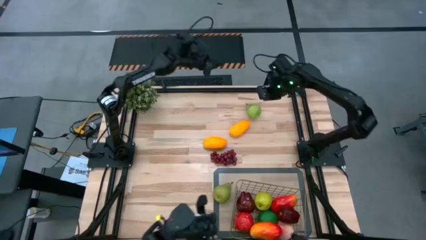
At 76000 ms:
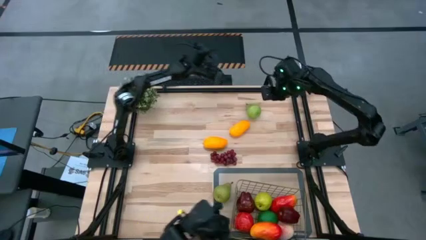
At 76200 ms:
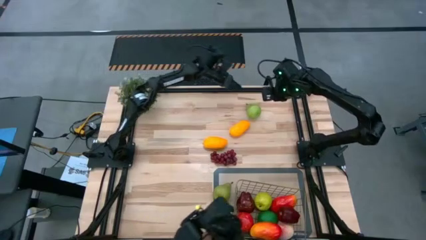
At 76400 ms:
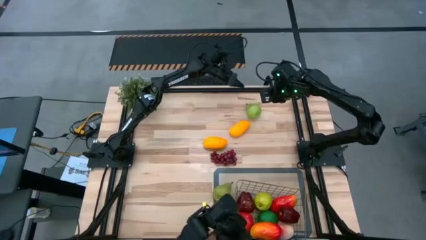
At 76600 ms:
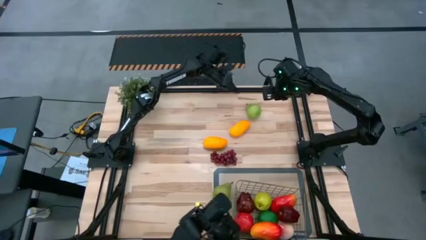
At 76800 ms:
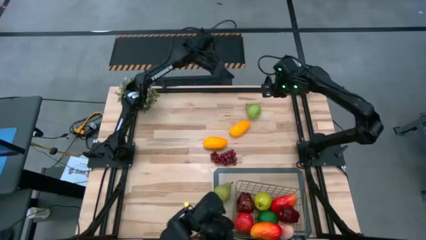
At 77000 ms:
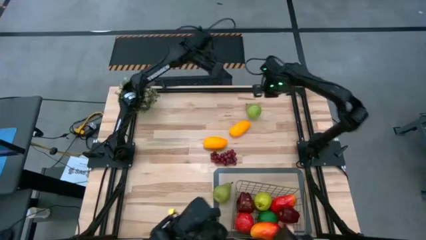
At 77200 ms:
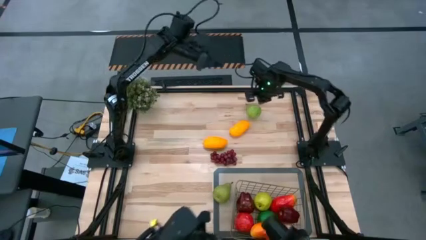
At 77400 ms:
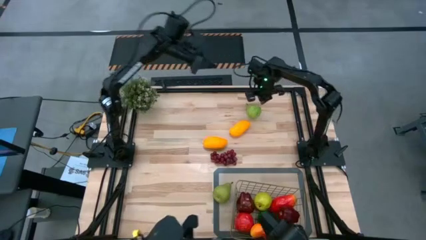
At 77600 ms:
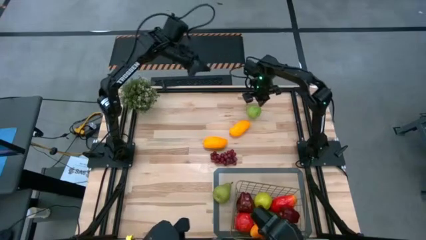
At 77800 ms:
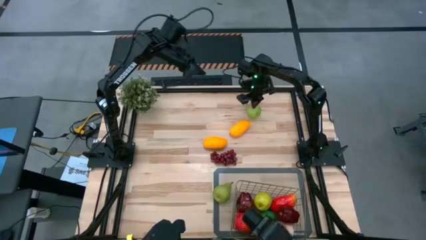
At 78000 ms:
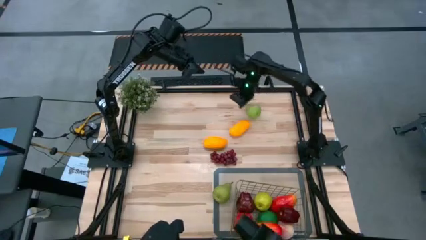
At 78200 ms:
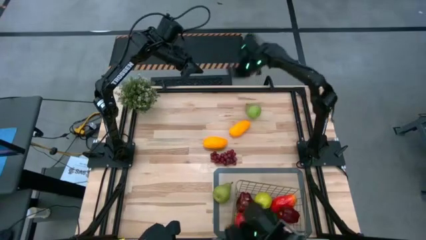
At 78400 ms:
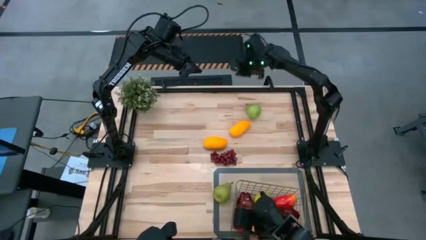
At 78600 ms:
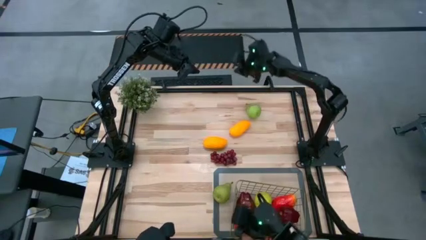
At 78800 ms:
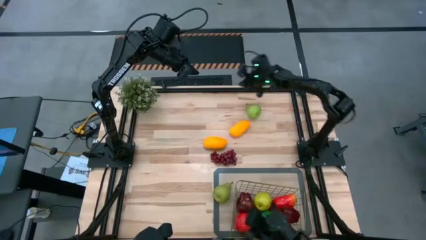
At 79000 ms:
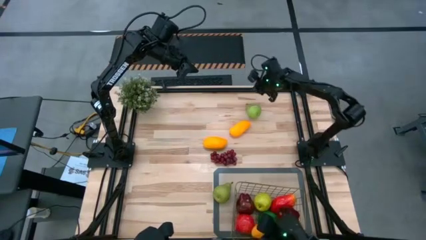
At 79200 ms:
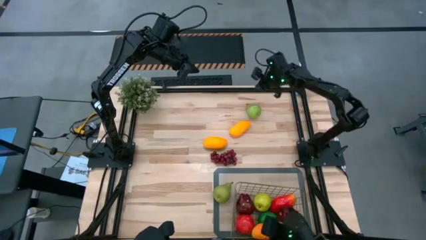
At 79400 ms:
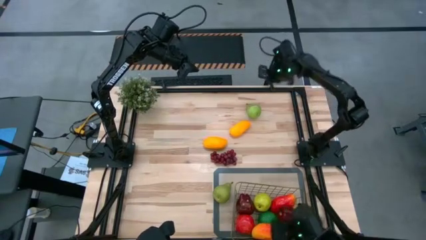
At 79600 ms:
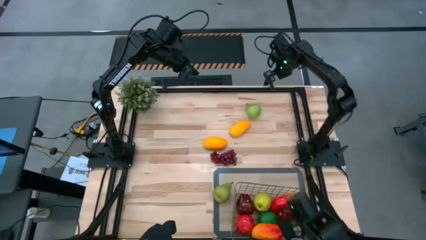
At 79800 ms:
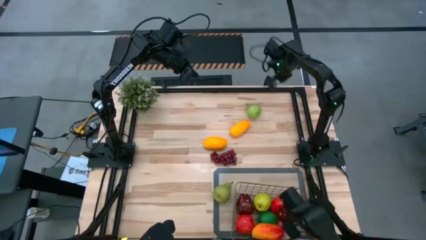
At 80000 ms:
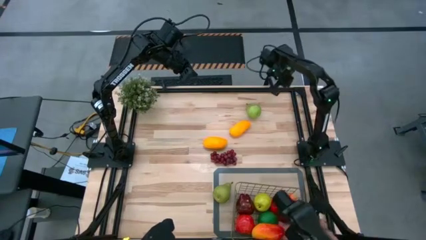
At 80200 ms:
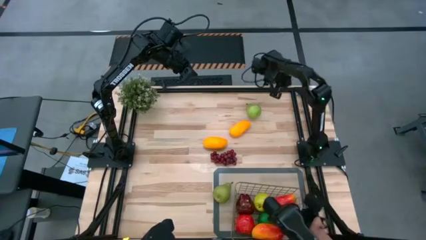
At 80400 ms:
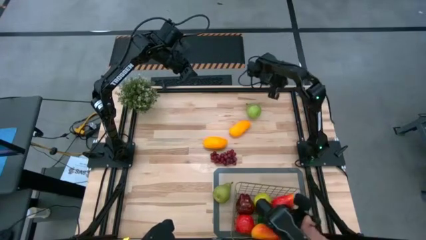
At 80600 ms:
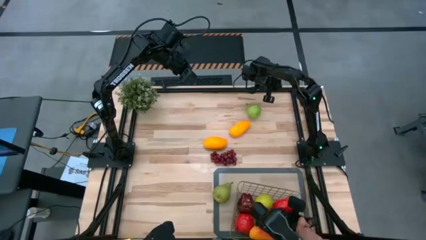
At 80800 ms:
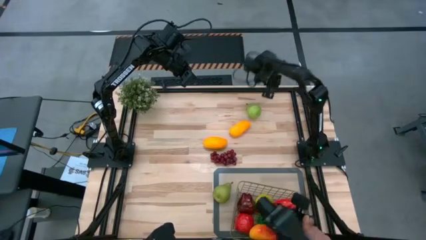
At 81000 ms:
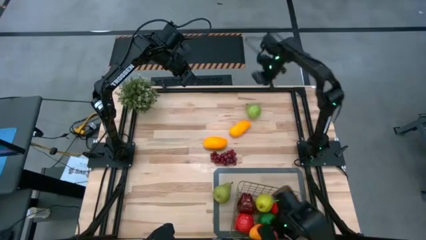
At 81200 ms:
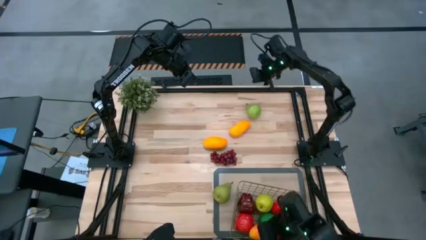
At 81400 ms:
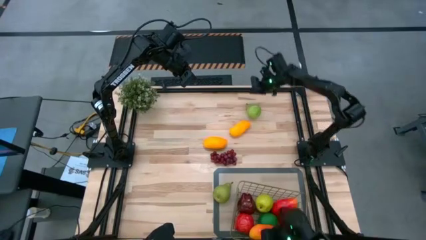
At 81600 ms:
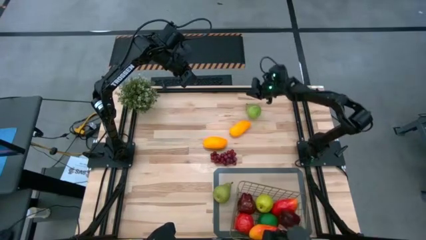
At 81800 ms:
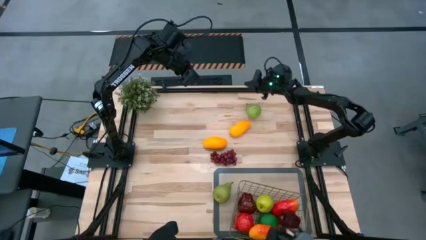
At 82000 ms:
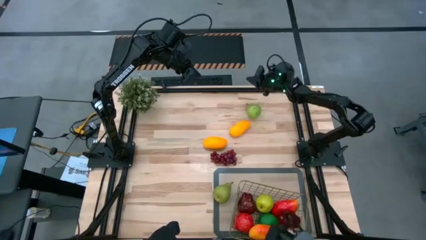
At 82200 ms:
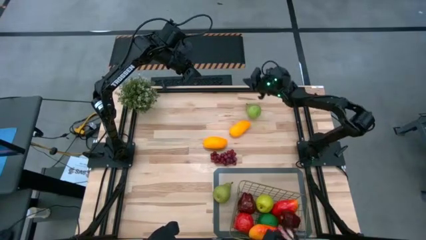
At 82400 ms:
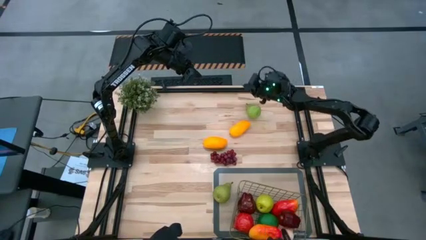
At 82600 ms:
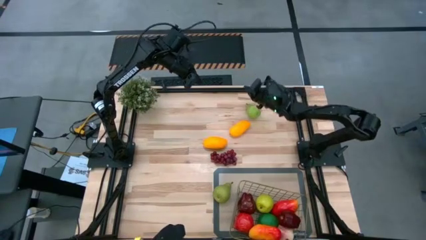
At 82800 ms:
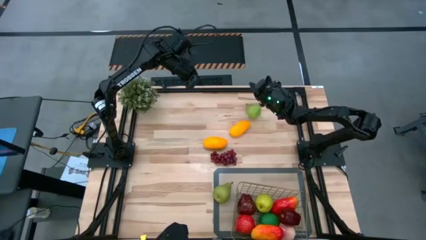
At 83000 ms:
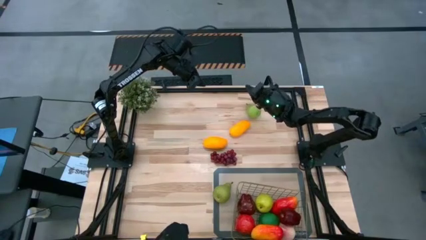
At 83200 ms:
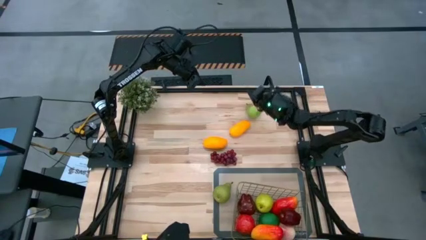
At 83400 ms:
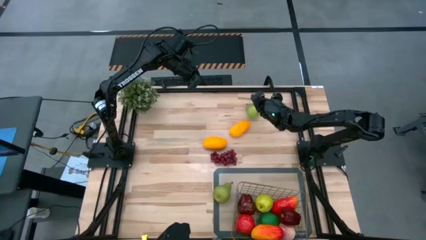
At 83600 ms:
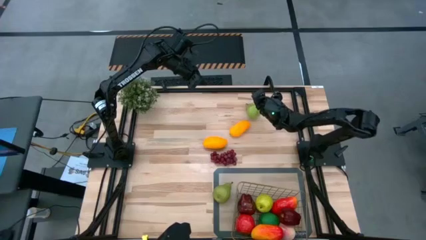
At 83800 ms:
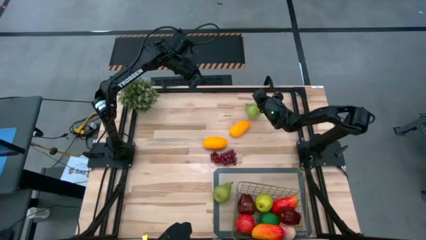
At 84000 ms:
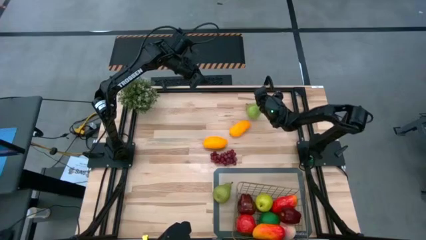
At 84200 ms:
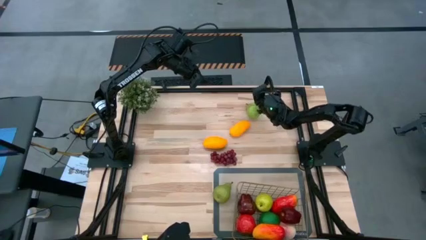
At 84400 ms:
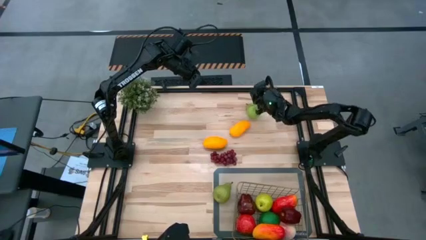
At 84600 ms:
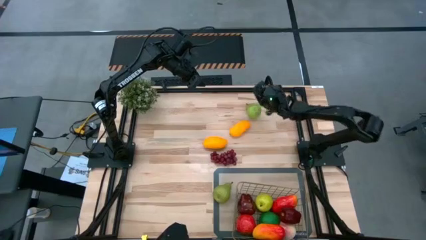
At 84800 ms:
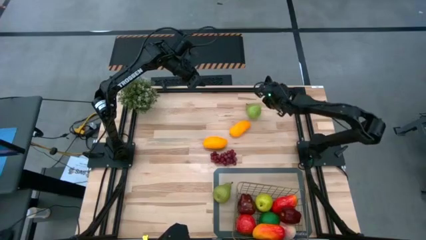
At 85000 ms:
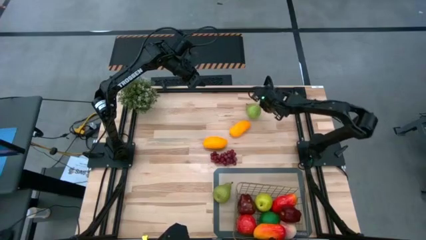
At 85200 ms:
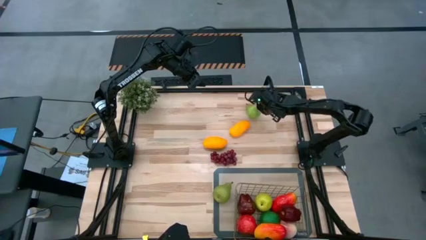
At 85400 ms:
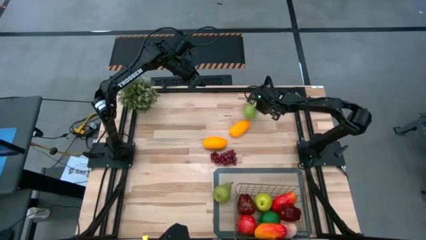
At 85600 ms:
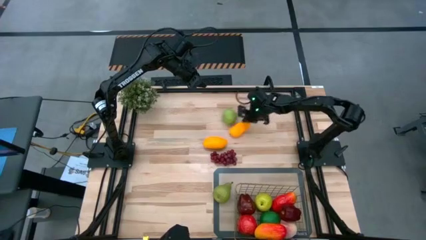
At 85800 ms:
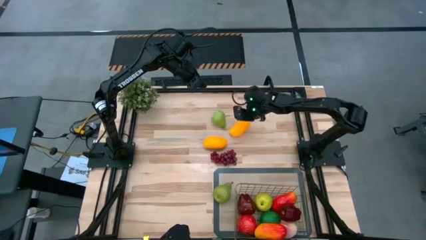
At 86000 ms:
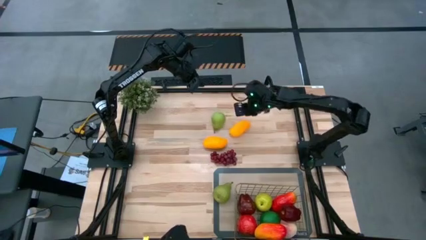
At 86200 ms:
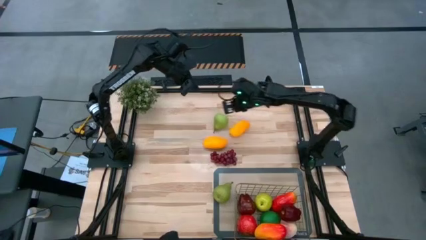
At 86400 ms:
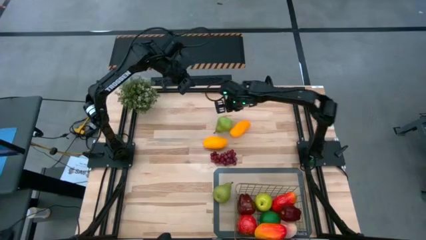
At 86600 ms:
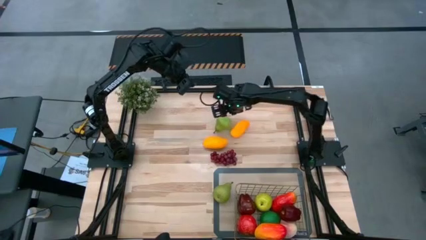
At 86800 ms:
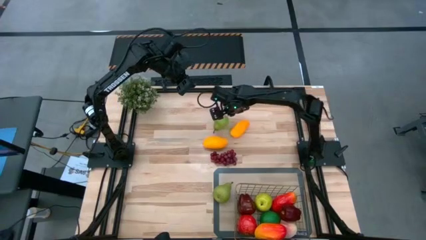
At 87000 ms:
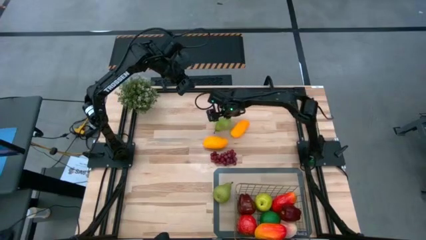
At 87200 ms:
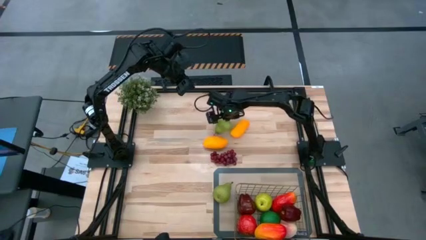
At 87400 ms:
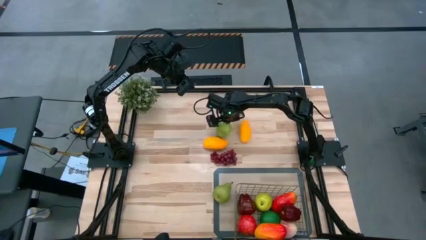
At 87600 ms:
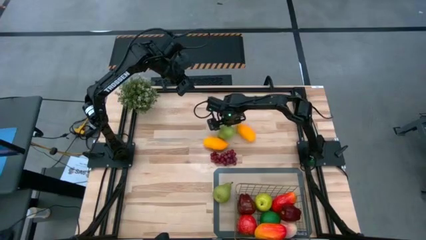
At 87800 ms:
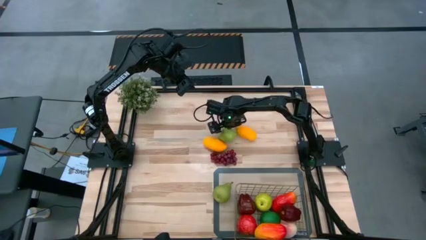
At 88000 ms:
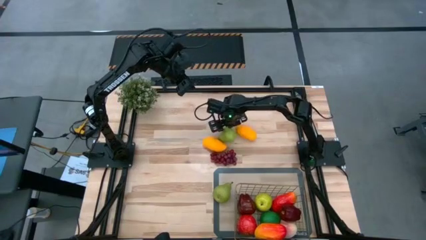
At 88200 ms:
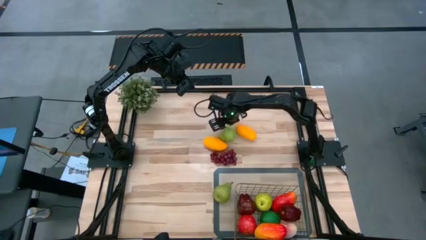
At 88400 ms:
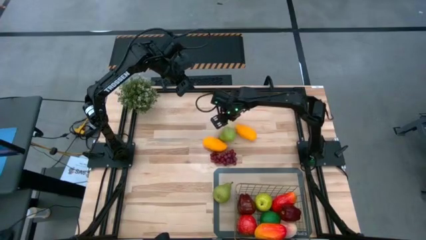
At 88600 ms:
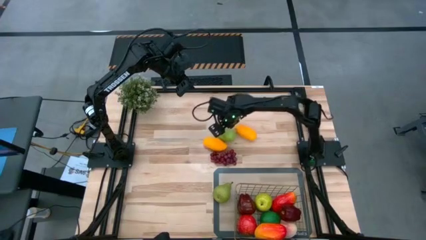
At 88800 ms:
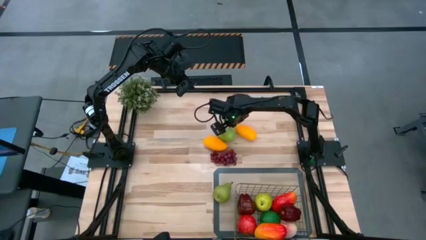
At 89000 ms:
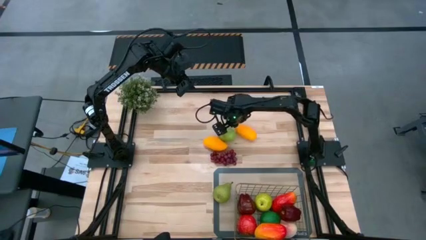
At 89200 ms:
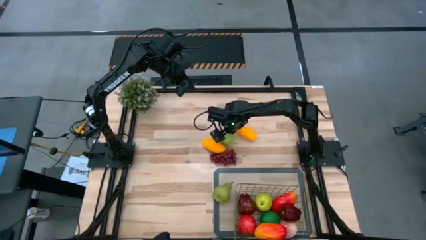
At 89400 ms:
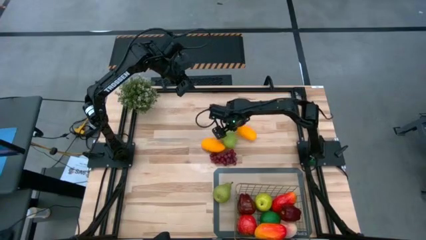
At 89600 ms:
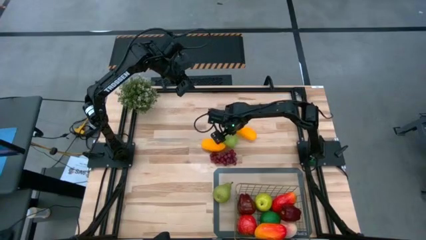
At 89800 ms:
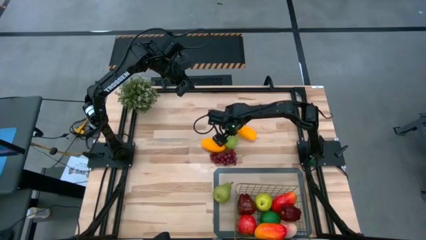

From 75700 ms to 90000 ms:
Task: Build produce basket
Put the top pear into the wire basket

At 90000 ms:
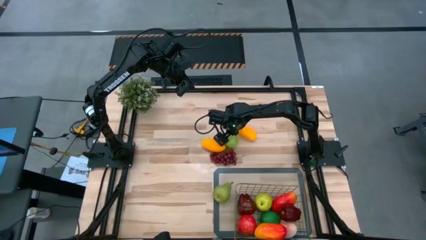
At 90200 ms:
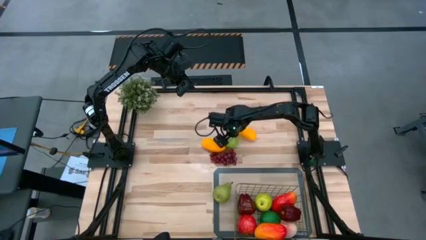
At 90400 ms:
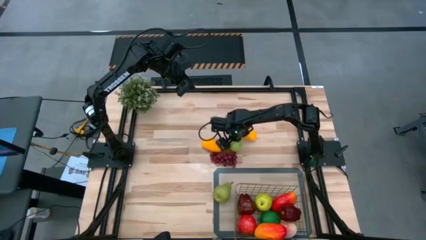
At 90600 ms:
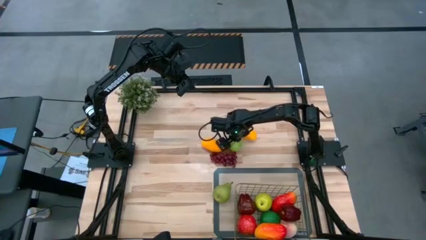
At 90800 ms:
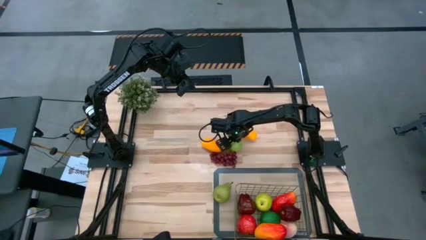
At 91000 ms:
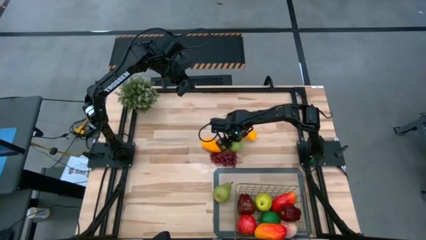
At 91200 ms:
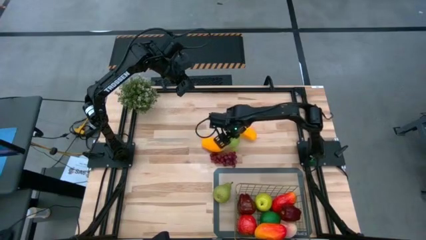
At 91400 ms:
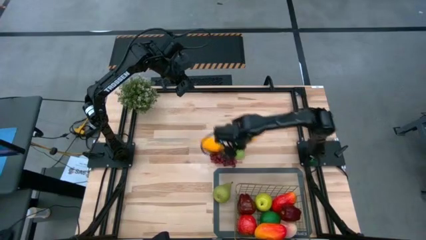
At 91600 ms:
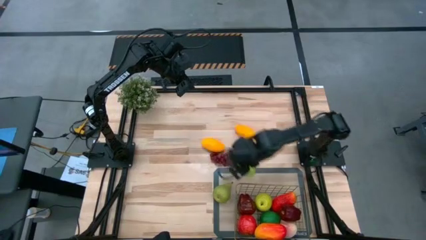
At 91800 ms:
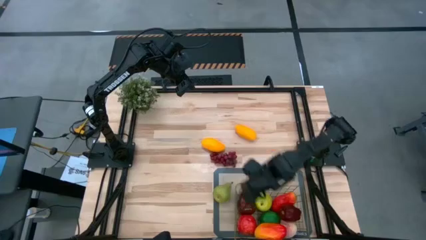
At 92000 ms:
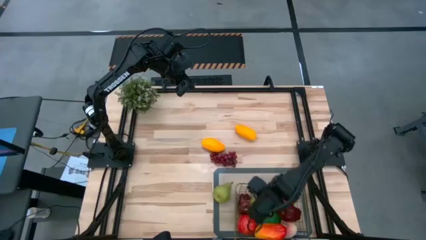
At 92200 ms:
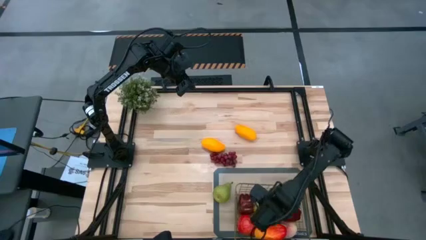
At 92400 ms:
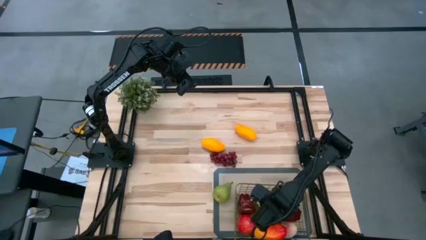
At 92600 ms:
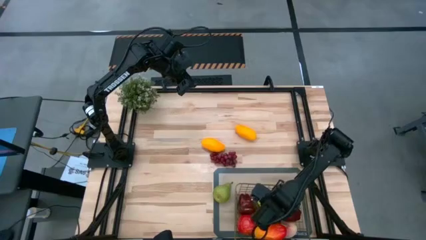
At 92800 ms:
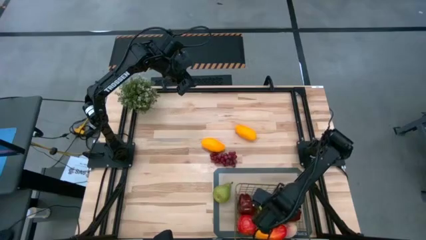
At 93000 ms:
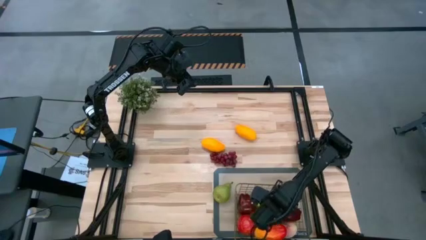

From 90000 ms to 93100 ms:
Put the top pear into the wire basket
